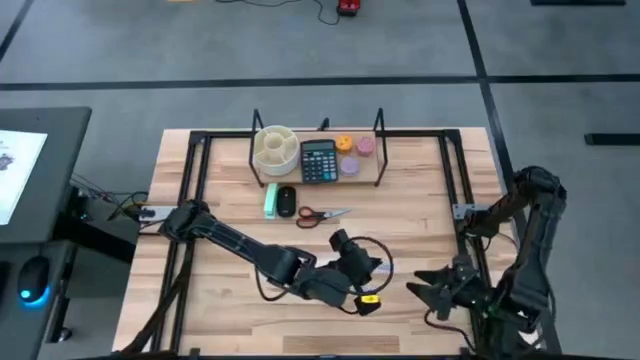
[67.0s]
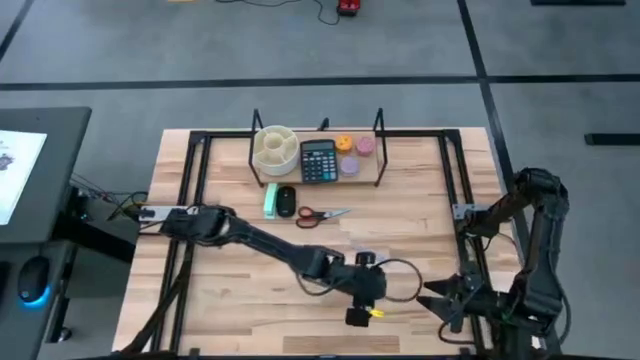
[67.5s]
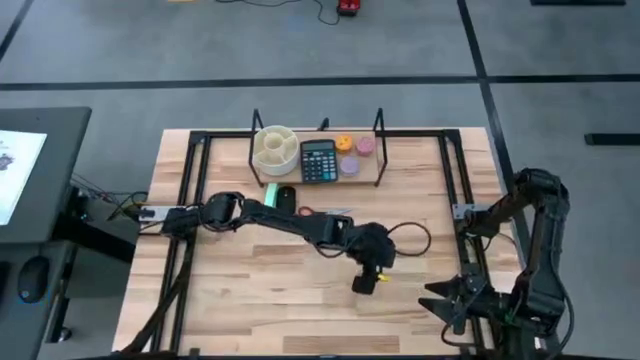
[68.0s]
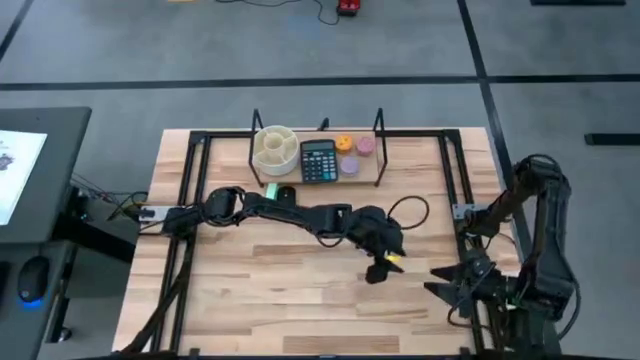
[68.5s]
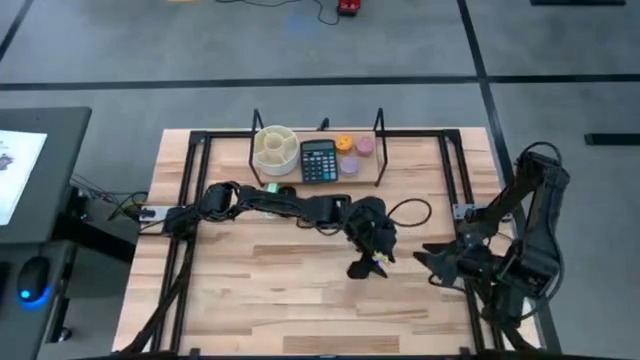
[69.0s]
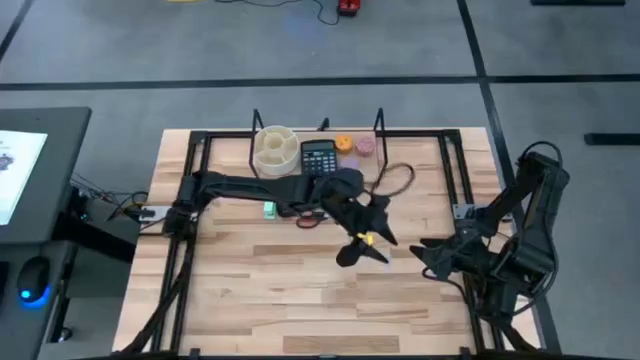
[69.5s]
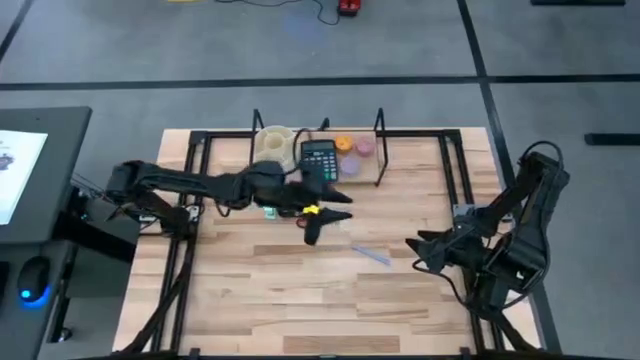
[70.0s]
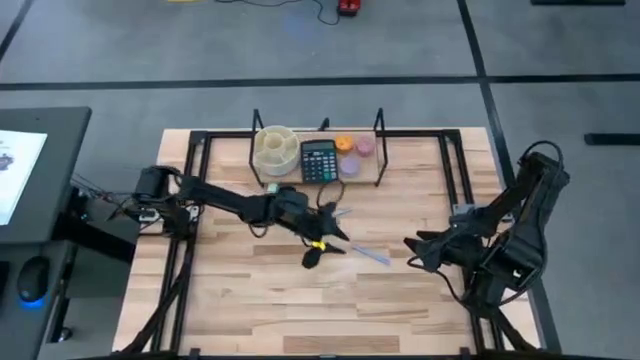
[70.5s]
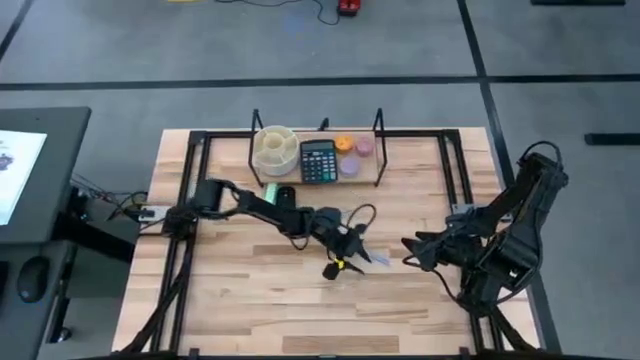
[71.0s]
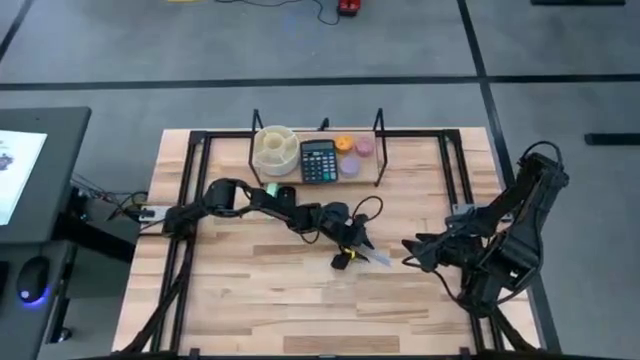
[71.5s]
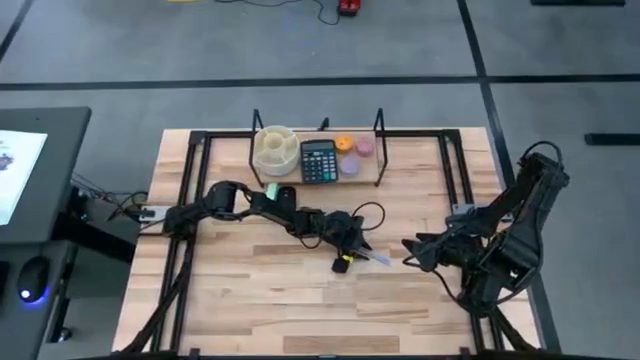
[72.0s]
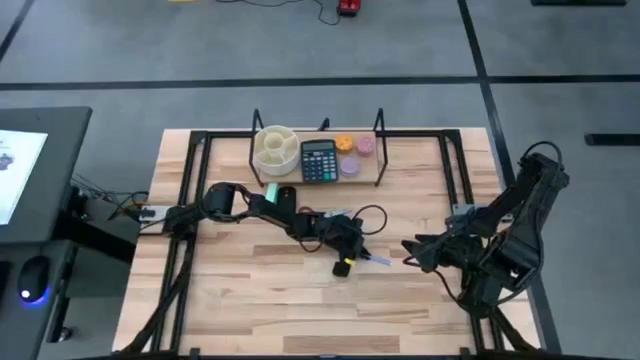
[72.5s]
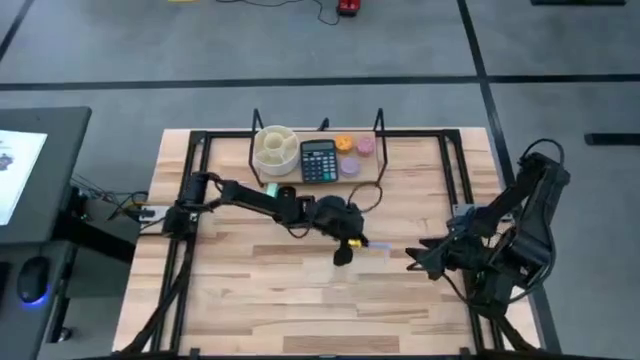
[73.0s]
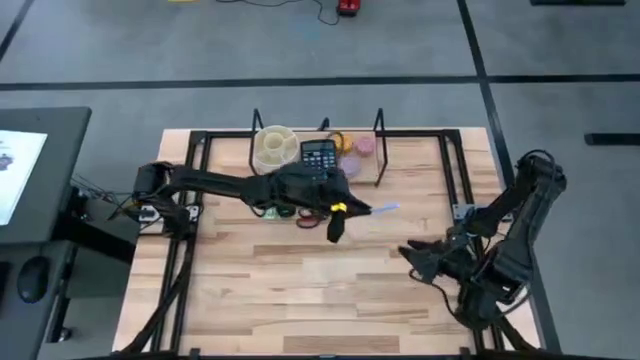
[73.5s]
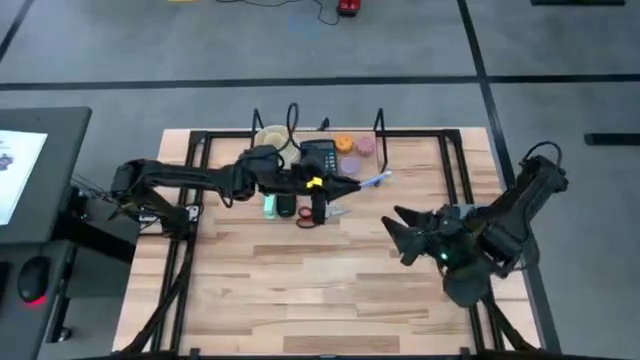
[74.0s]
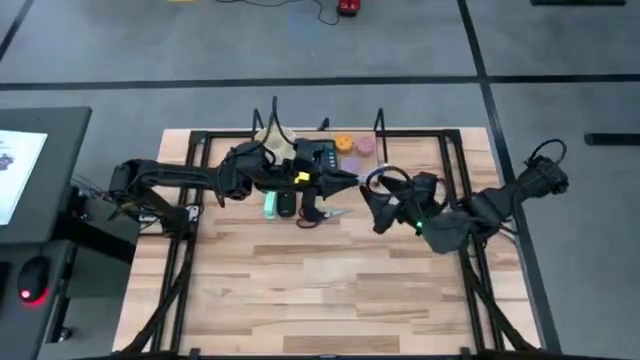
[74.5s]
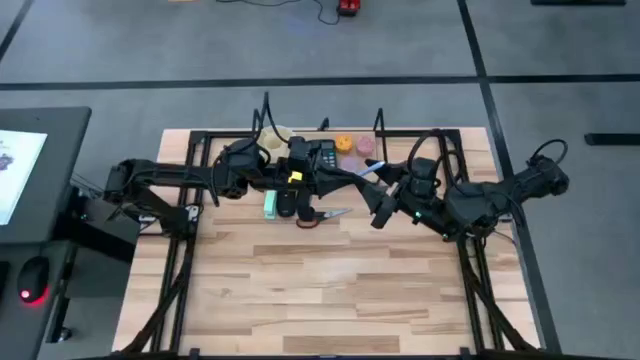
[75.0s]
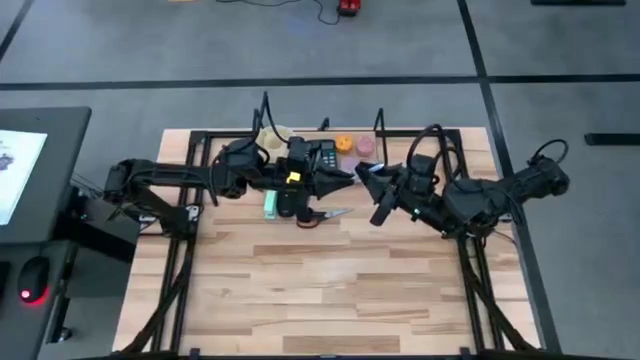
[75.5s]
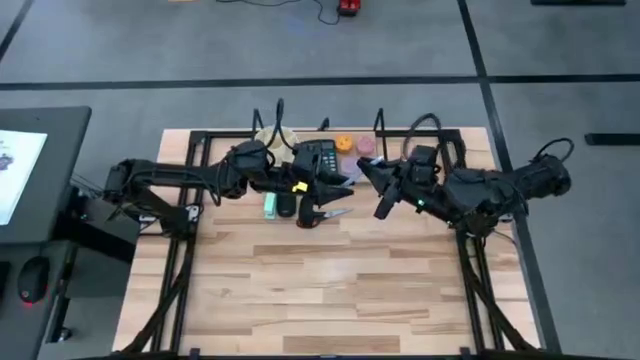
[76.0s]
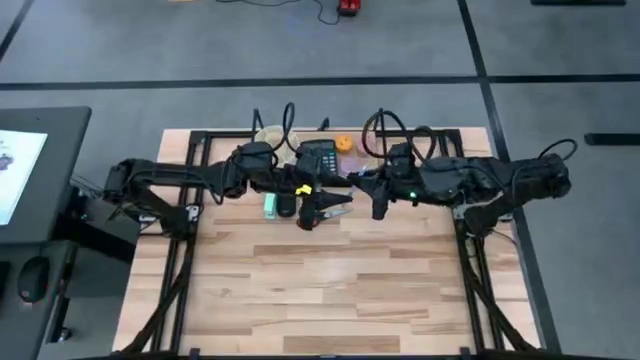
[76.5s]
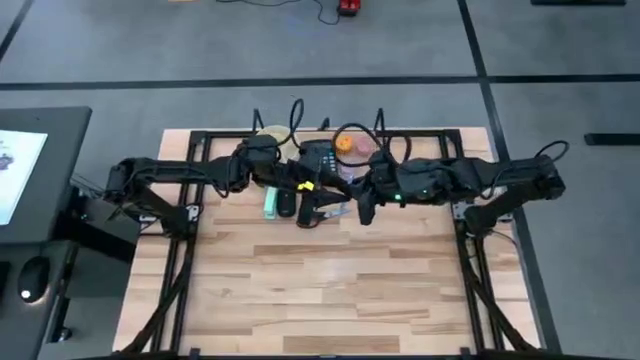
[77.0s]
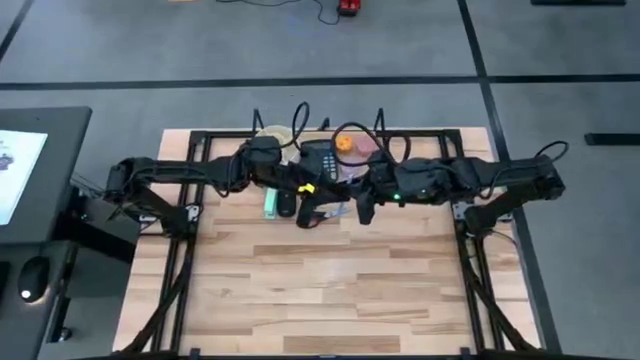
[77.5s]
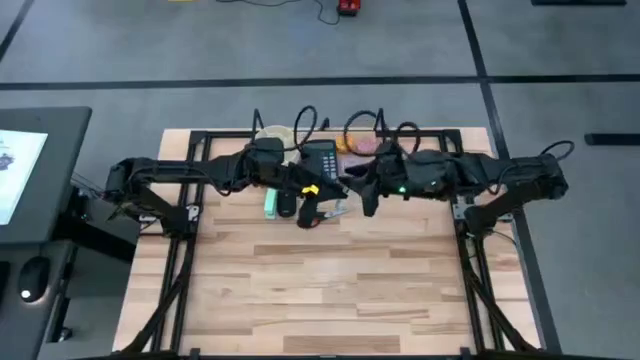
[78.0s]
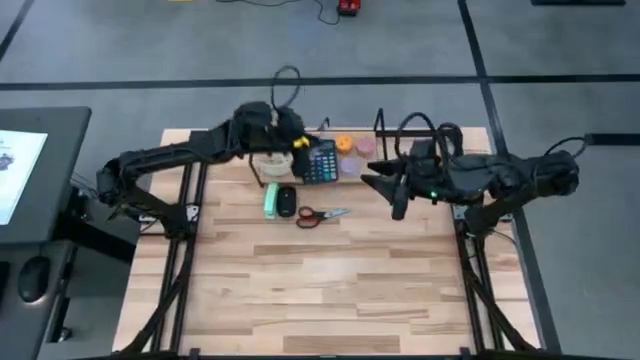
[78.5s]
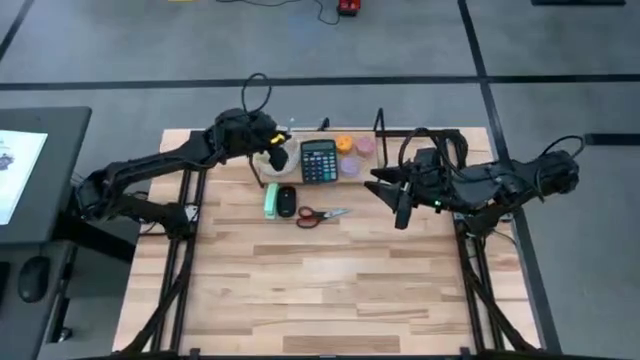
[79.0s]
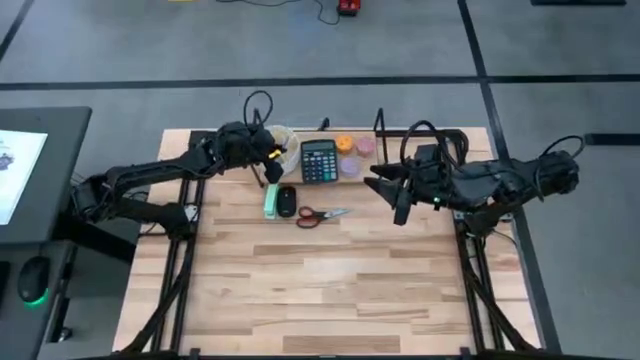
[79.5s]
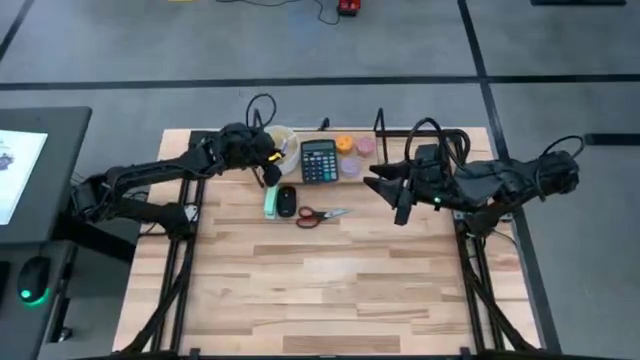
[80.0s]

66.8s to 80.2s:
Task: Stock shelves
Put the gray pen into the white pen organizer on the shelf

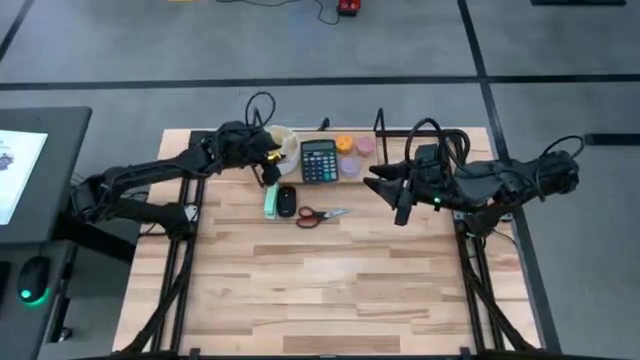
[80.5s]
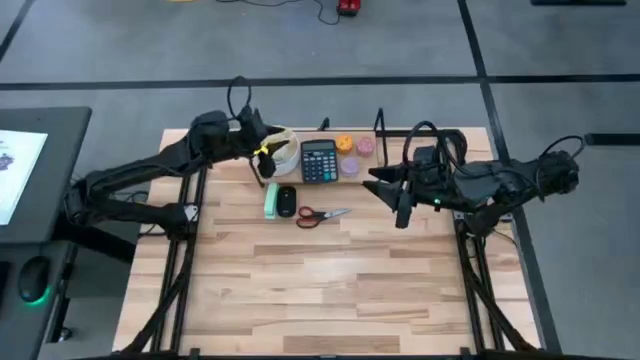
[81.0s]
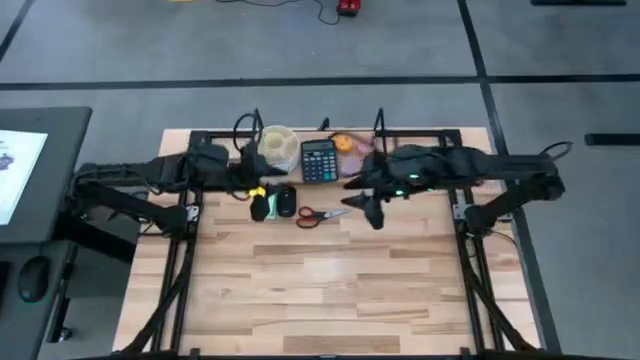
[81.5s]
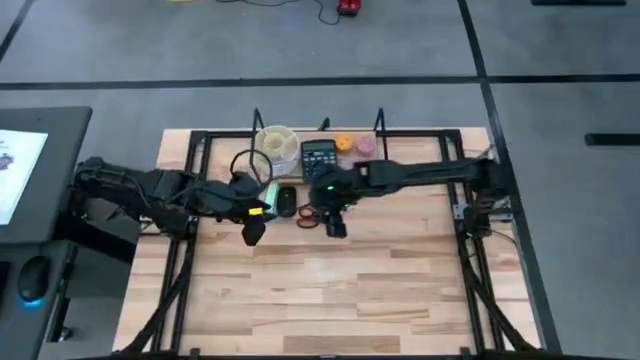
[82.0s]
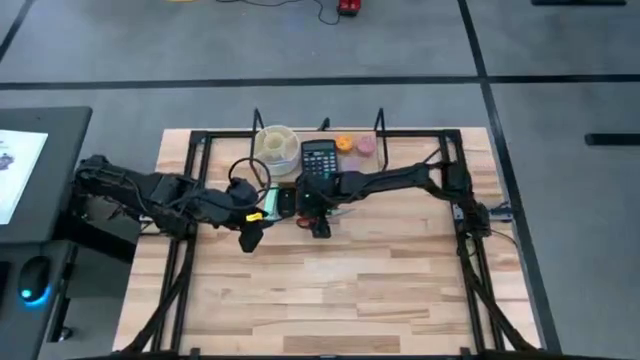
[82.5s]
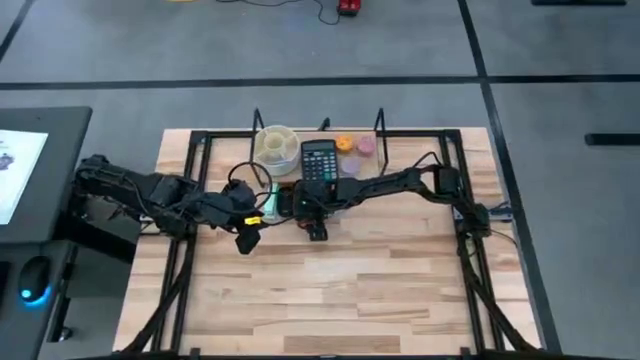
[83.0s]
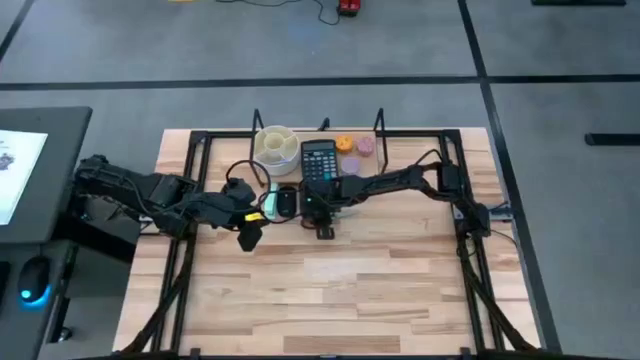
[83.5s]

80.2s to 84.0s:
Put the black scissors into the white pen organizer on the shelf

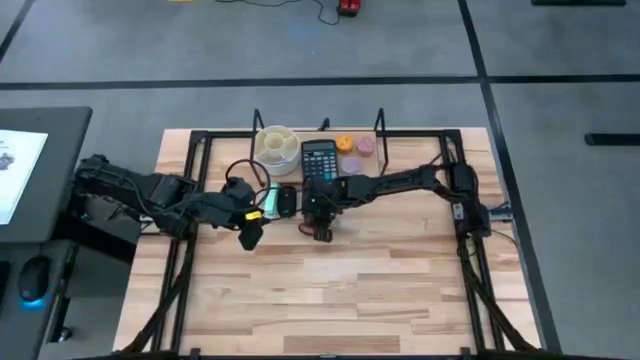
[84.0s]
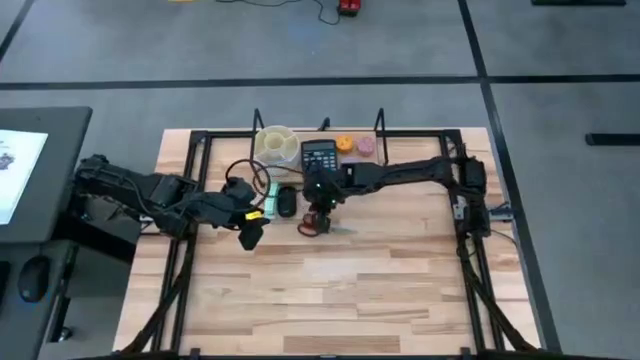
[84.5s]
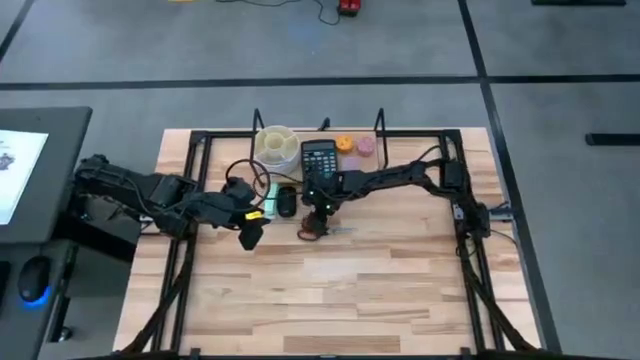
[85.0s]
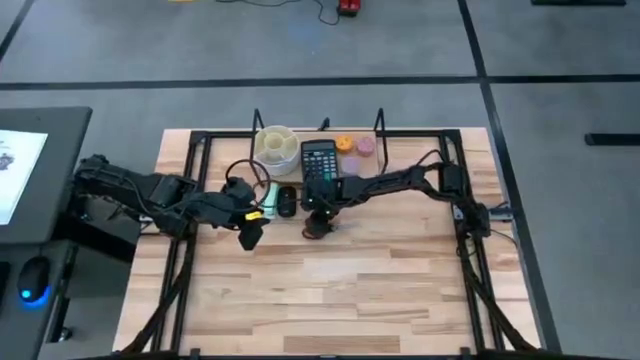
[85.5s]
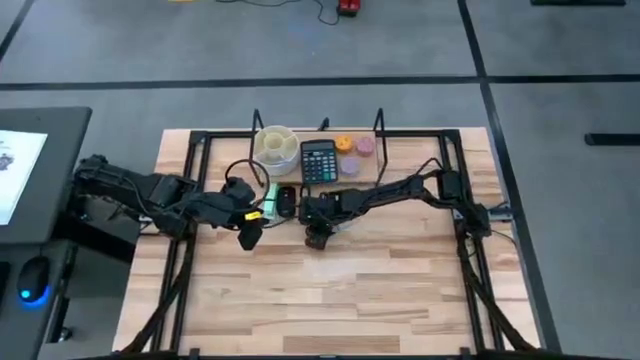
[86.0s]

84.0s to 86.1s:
Put the black scissors into the white pen organizer on the shelf

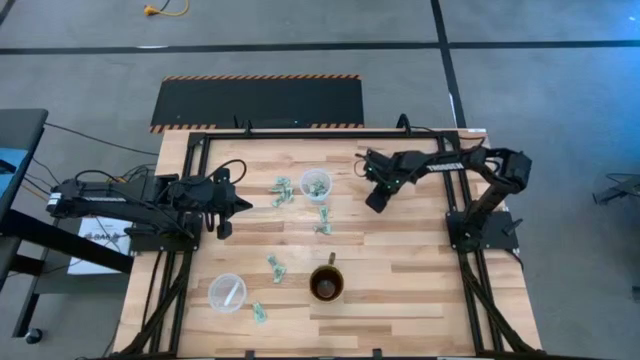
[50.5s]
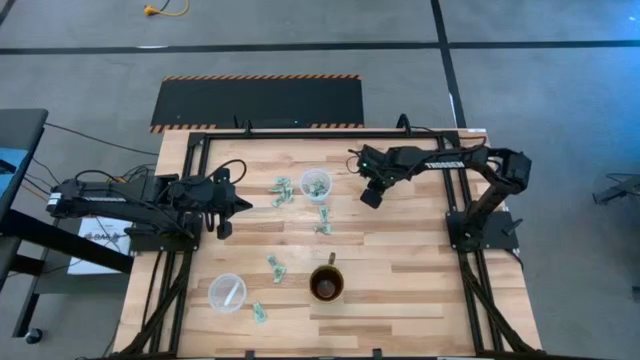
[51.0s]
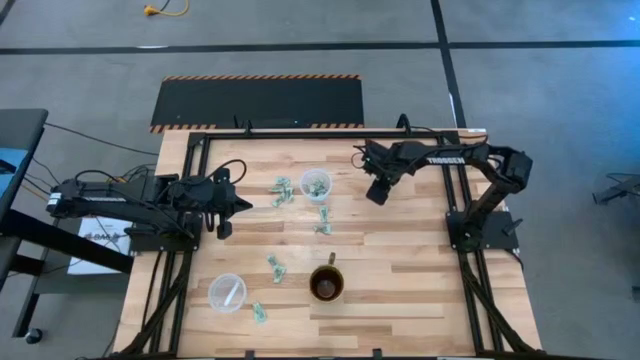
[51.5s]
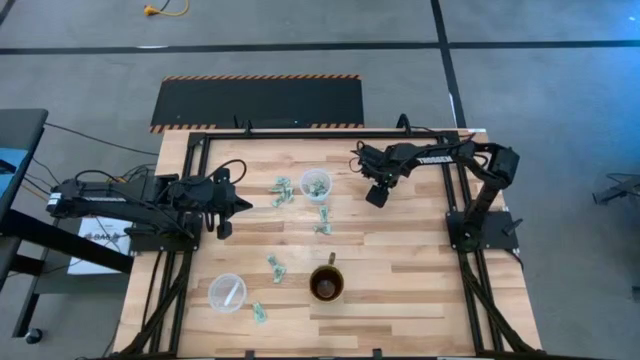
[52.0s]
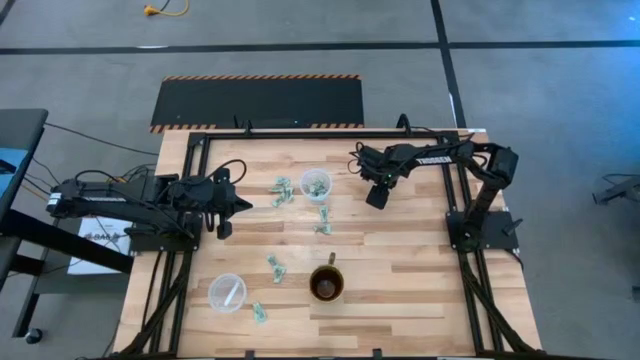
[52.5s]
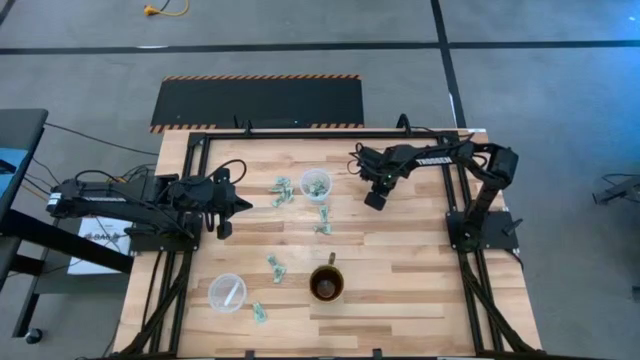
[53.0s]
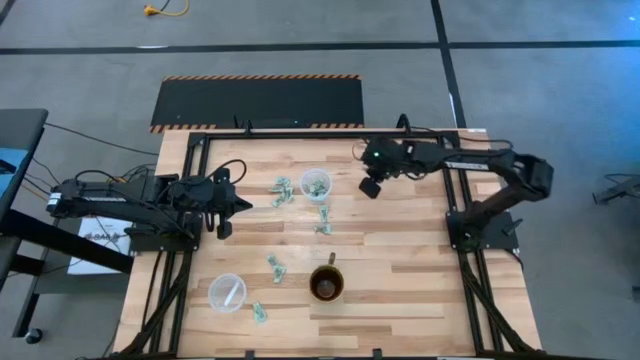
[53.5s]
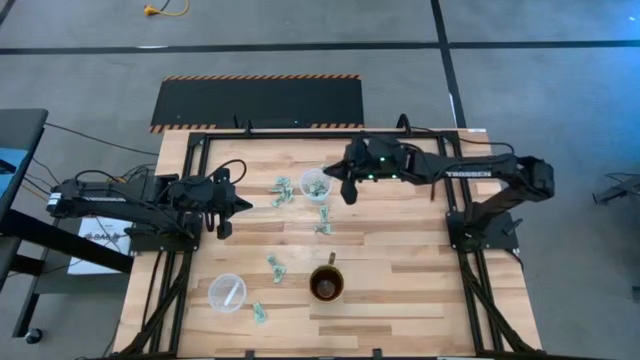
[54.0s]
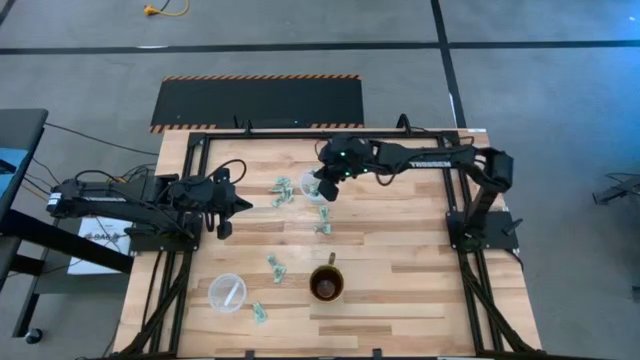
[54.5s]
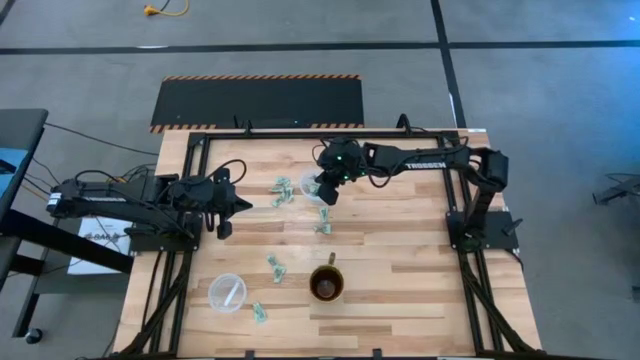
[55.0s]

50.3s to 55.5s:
Task: Pick and place items into bin
Put the stevia packet into the top transparent bin
